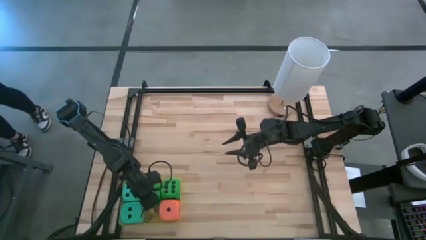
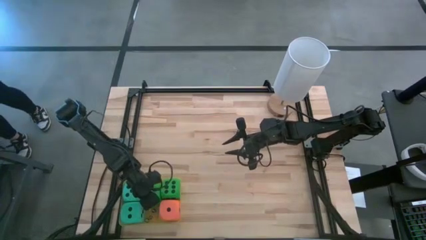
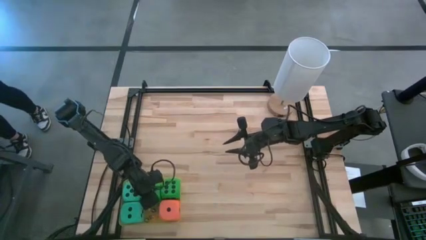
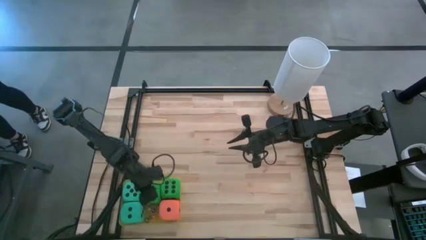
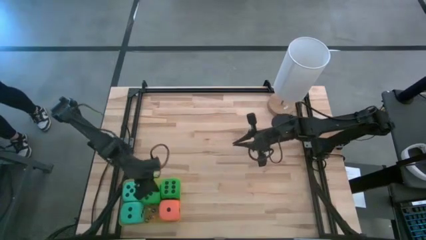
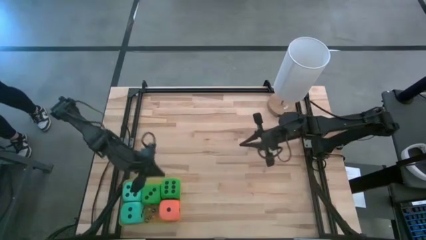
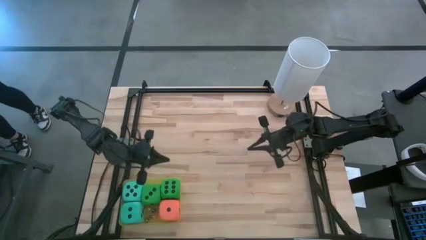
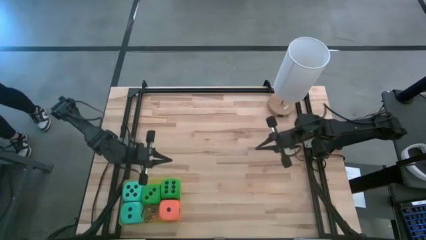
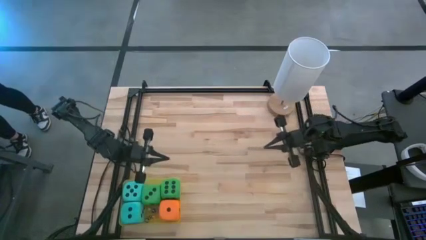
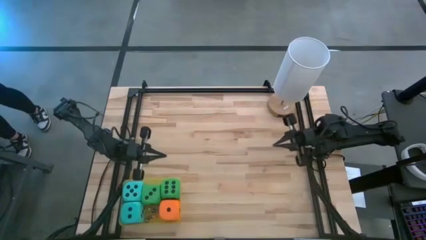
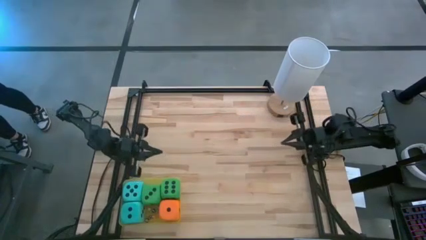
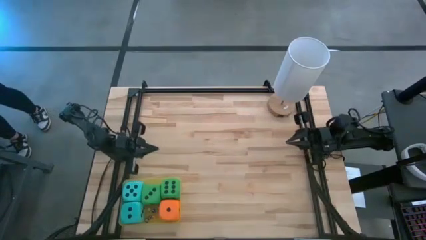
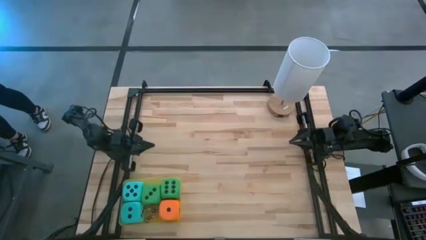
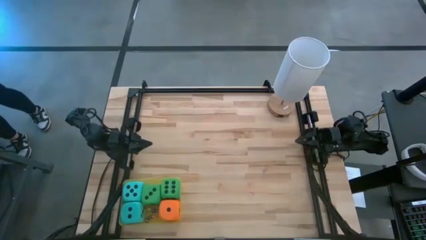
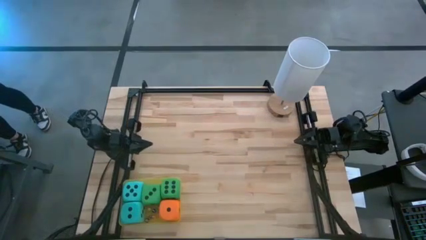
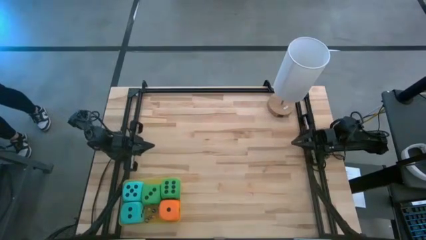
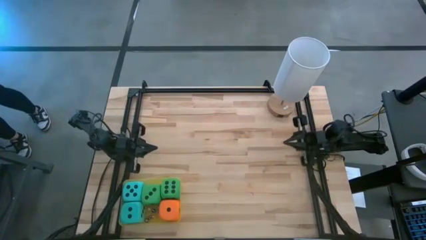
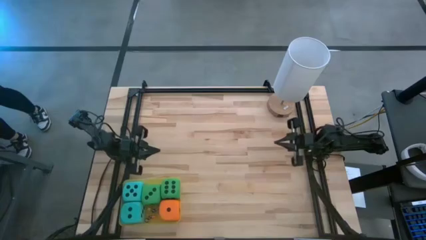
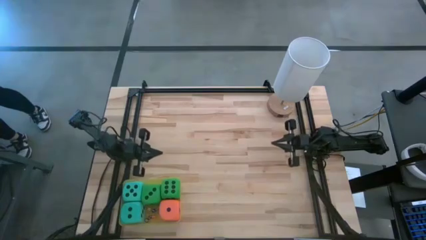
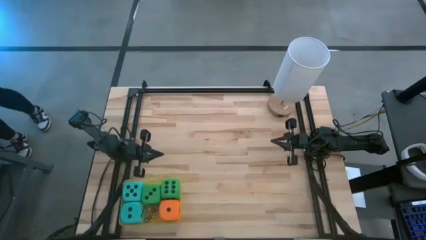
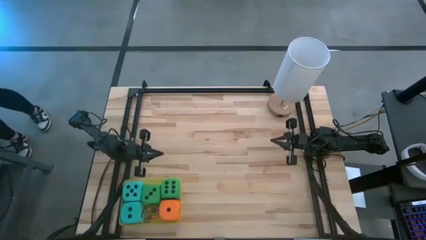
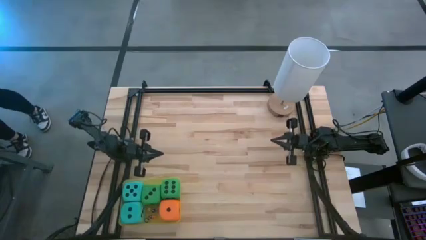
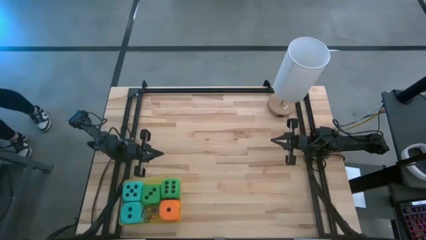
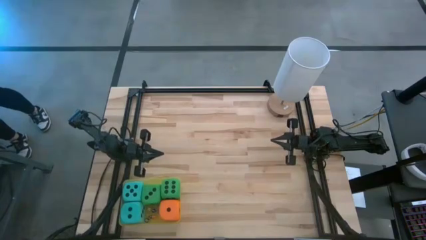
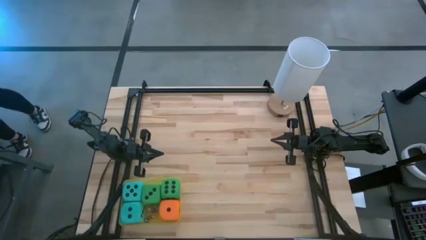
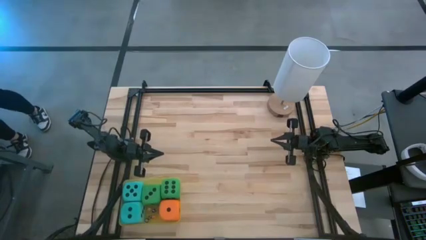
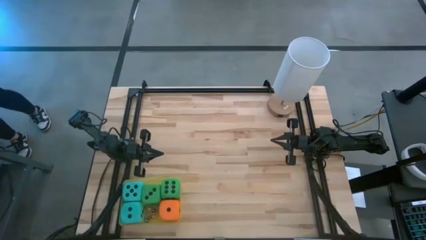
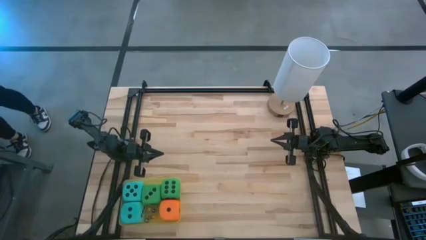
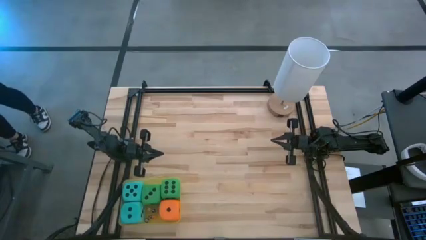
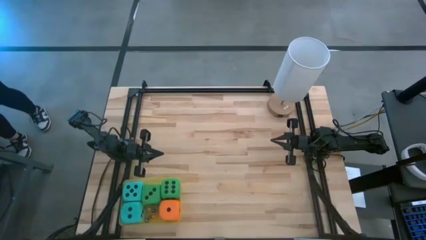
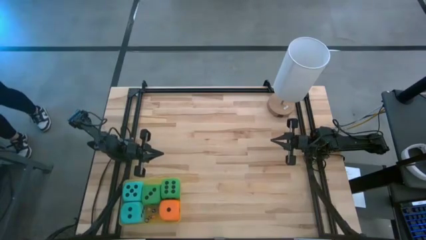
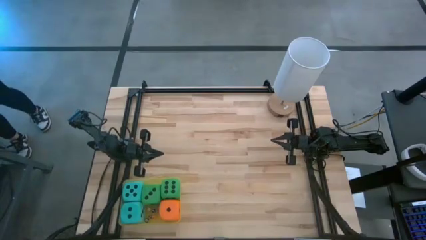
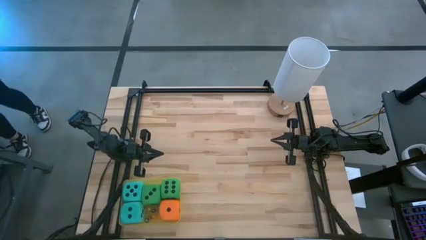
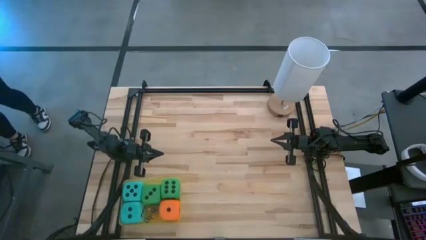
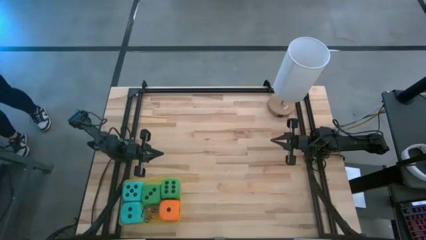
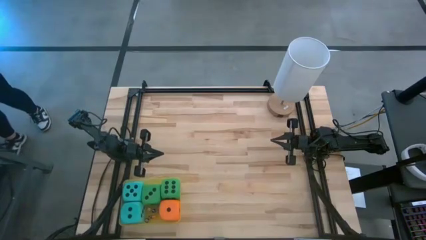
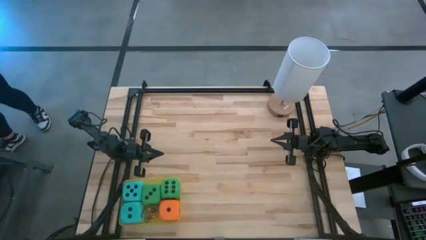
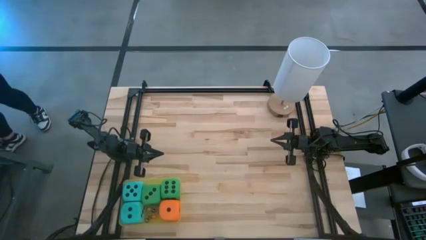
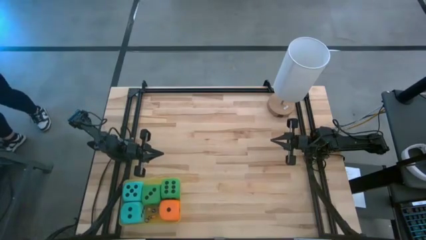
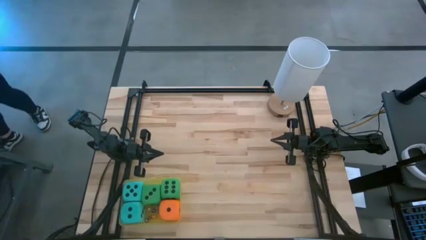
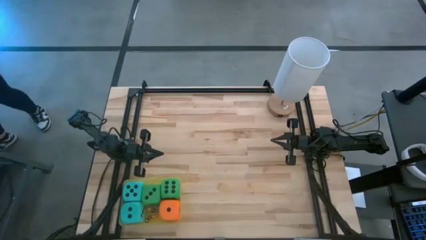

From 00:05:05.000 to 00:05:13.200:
Task: Pick & Place Dice
Return to Home Position

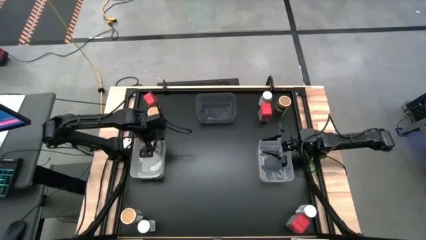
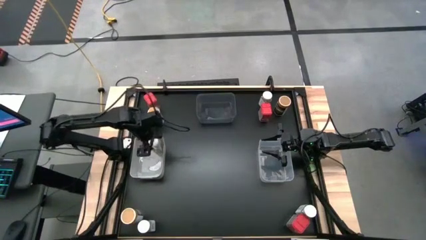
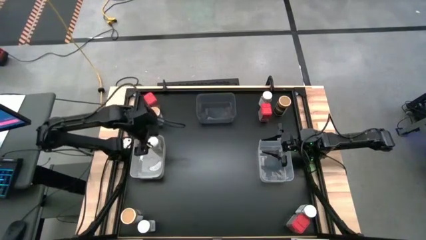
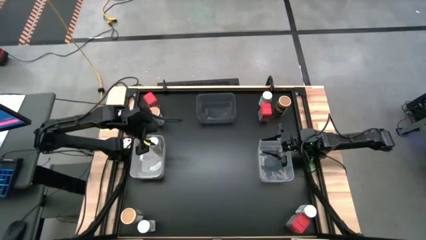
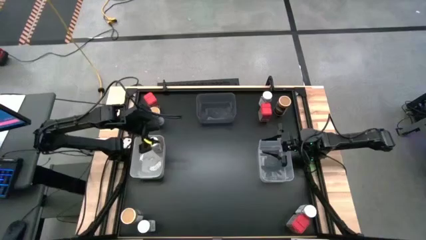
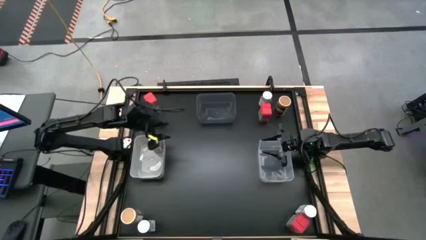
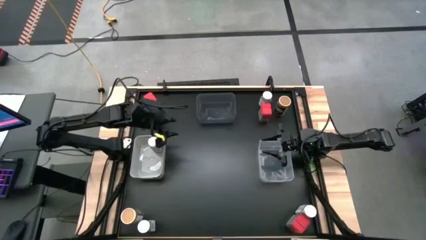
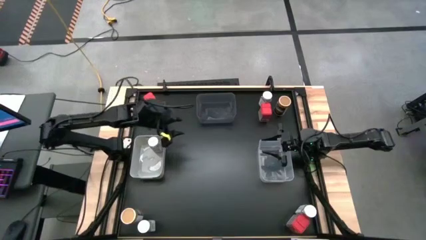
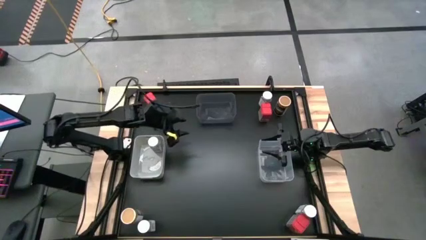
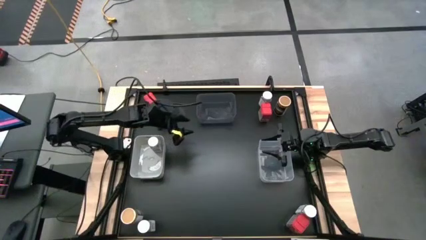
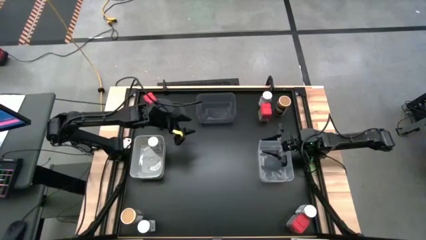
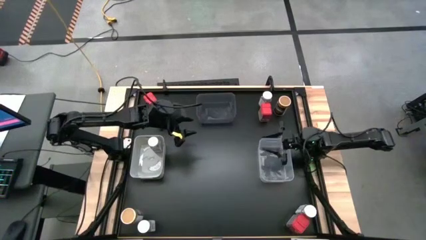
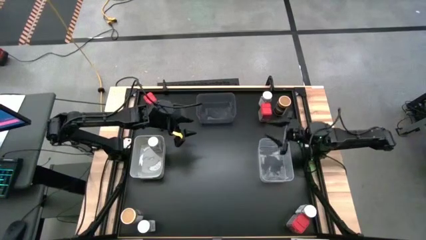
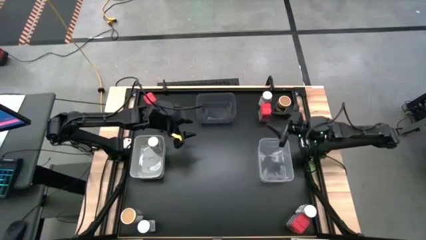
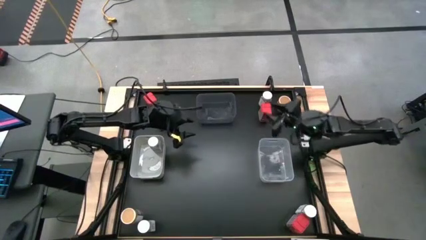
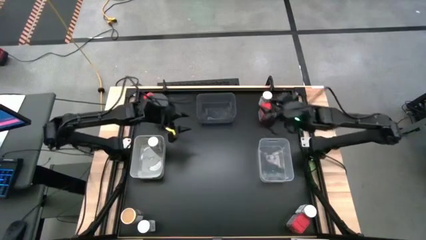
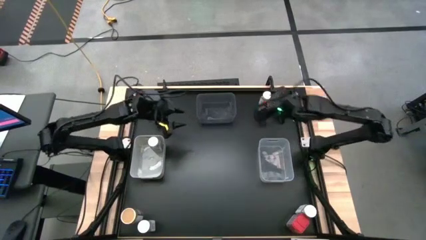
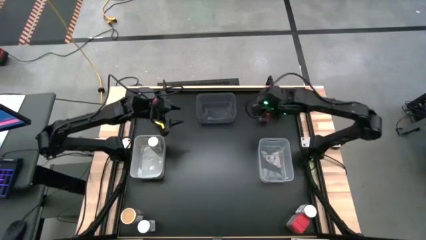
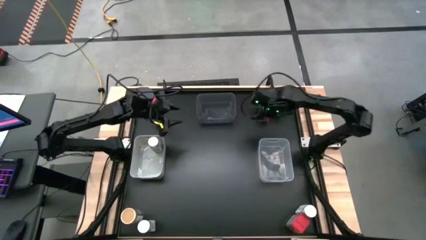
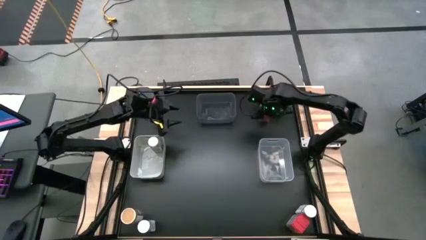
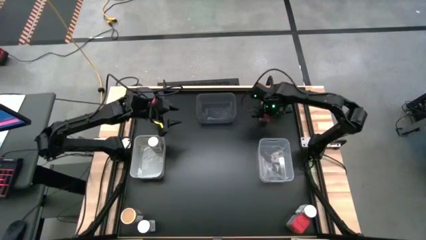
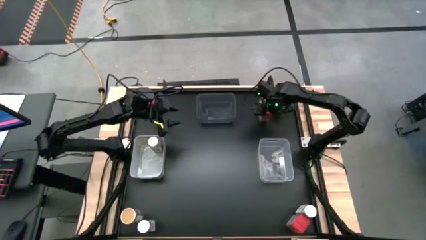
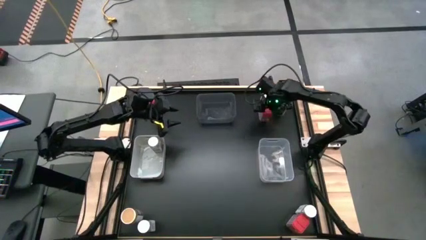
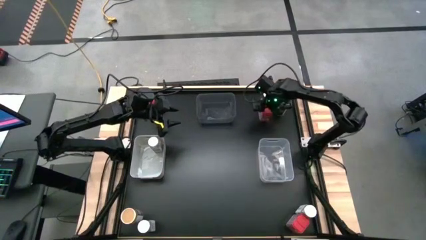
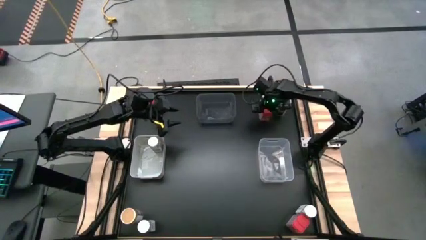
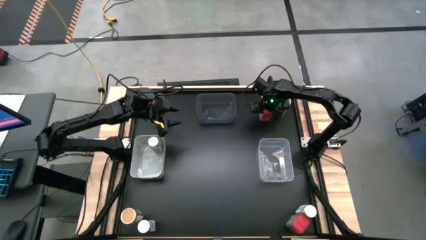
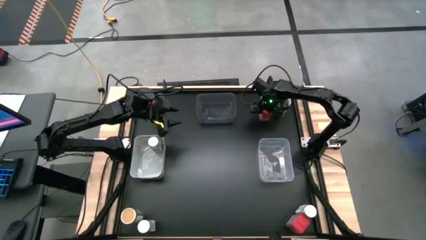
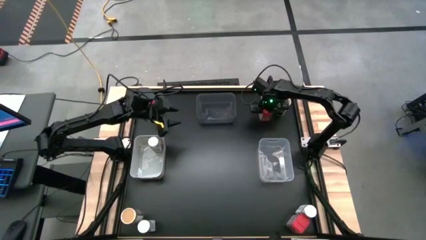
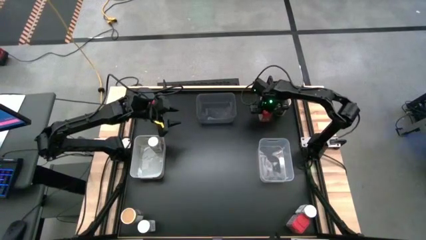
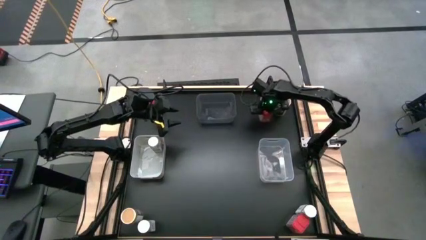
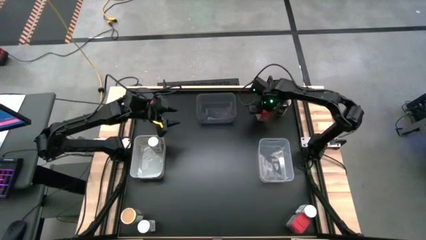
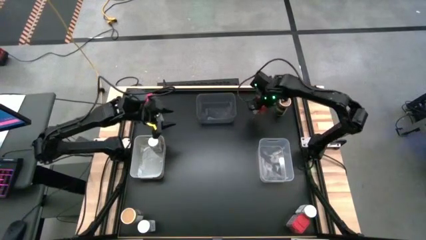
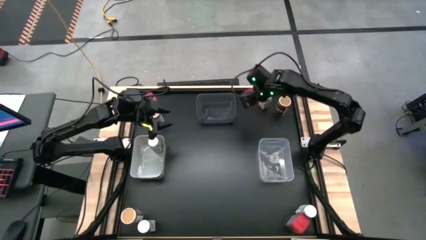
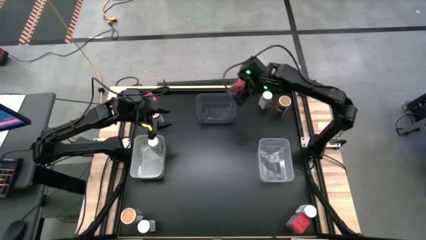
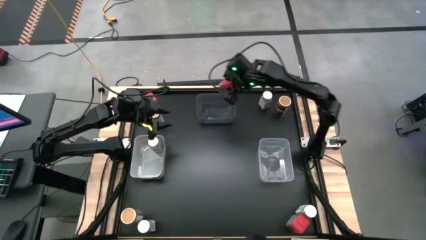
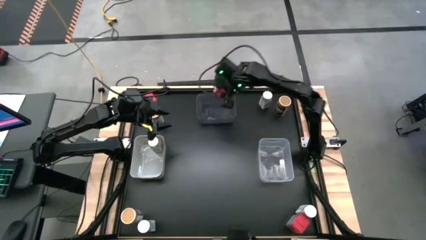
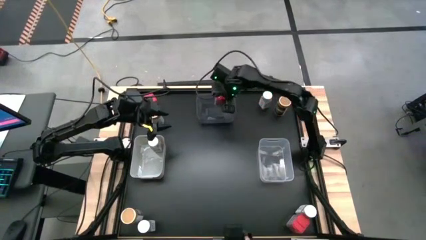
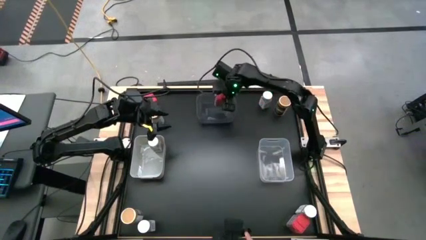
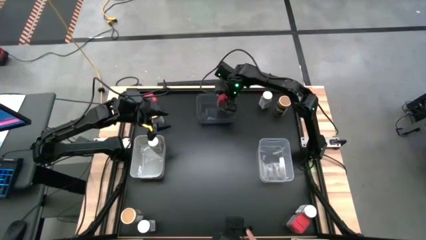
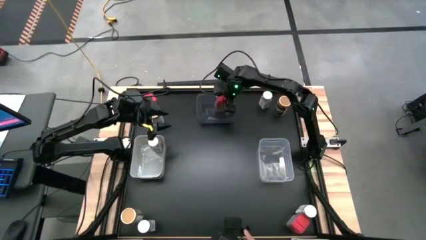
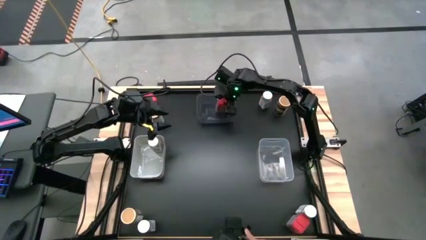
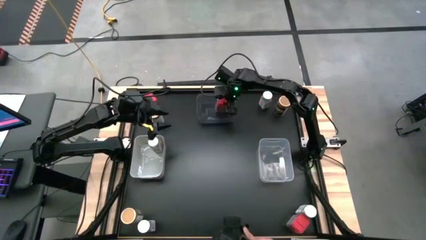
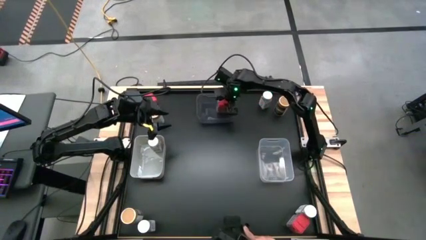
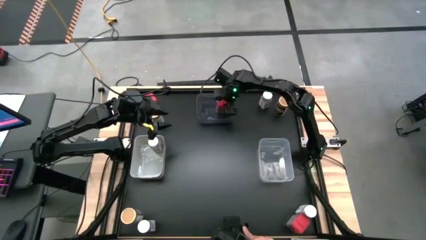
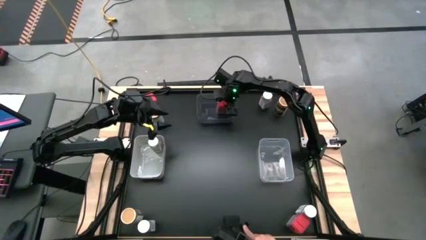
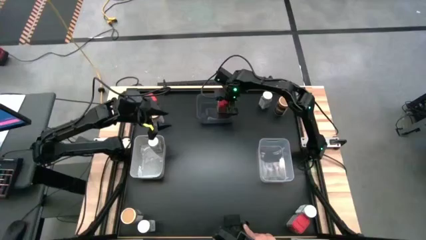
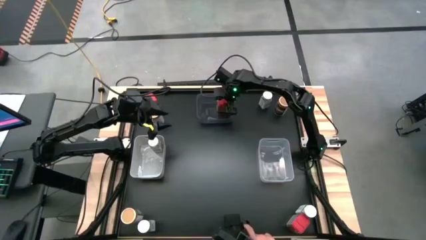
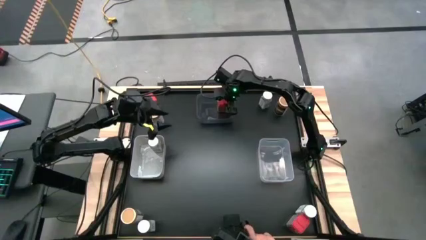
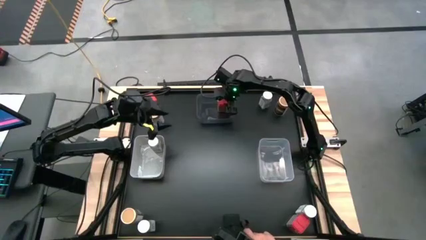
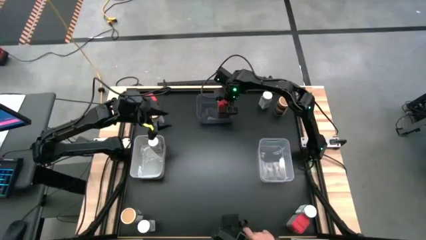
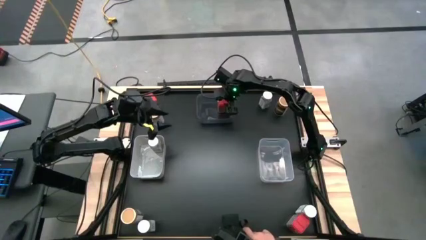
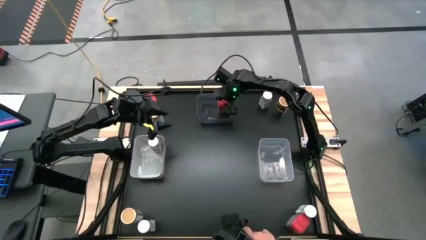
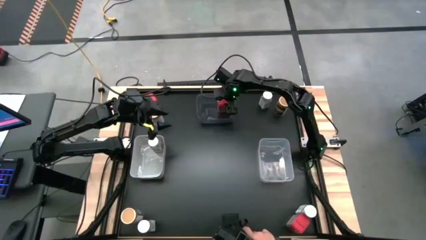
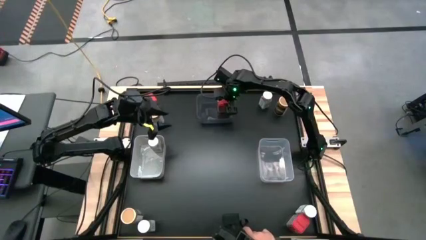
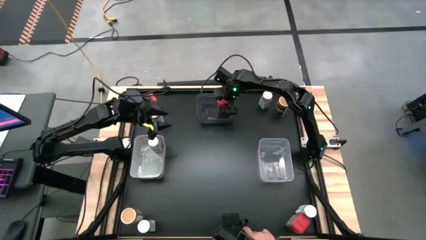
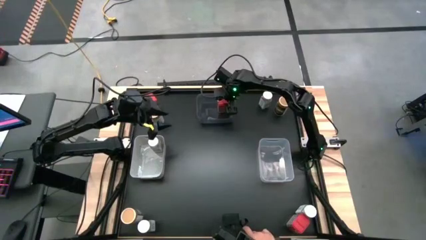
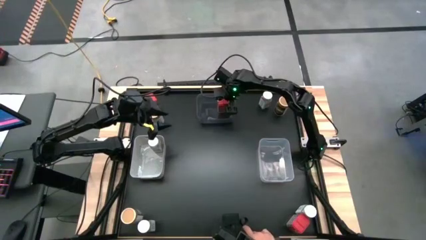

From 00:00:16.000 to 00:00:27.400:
Task: Sort spices by type
Put the top right red seasoning can into the black bin
